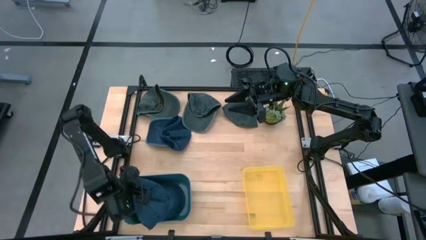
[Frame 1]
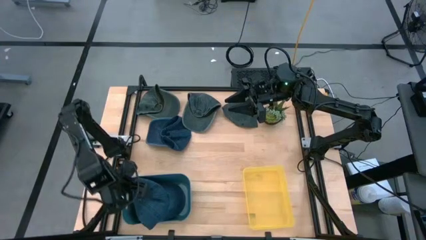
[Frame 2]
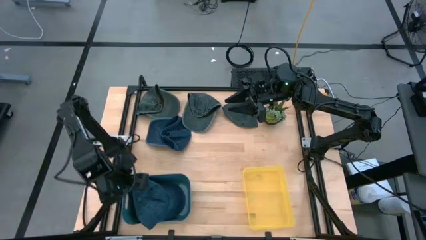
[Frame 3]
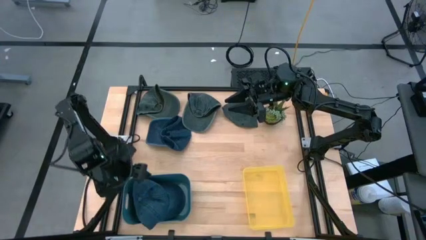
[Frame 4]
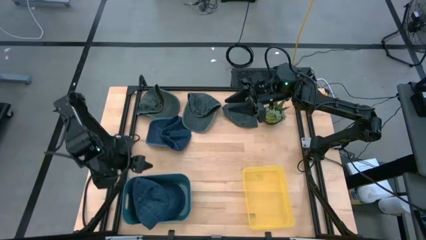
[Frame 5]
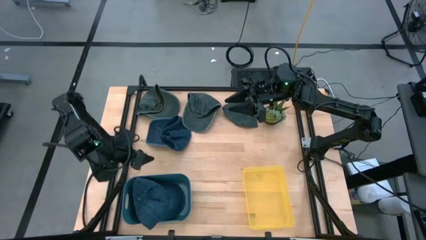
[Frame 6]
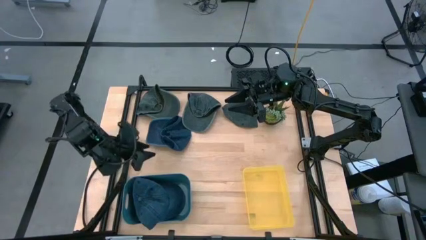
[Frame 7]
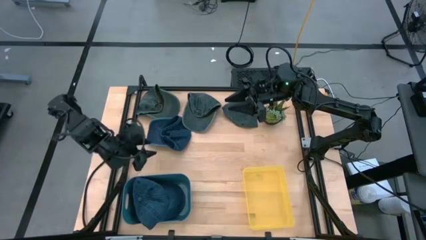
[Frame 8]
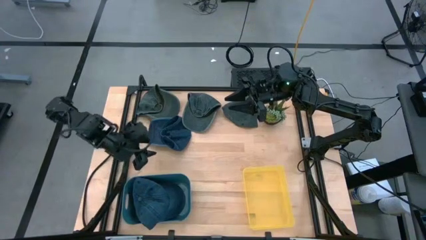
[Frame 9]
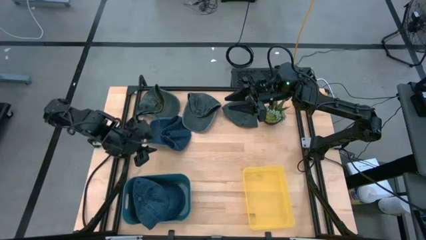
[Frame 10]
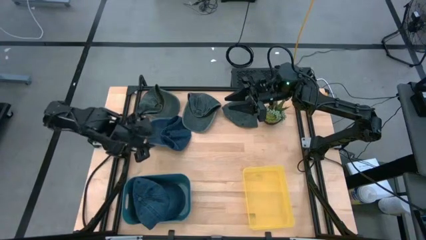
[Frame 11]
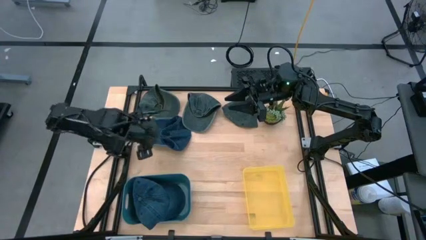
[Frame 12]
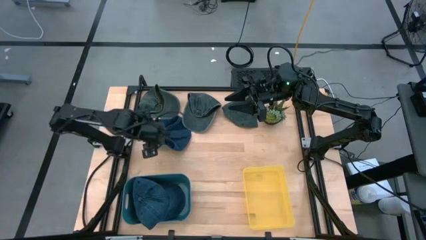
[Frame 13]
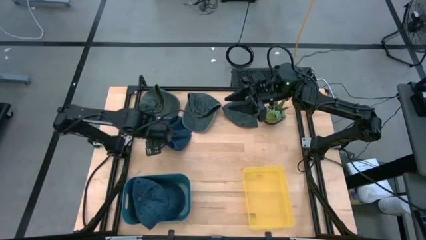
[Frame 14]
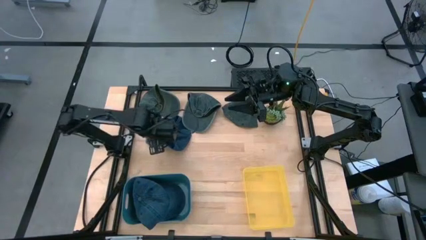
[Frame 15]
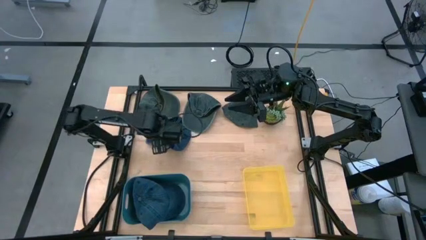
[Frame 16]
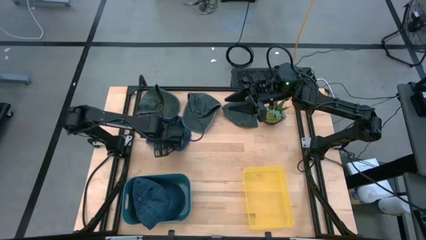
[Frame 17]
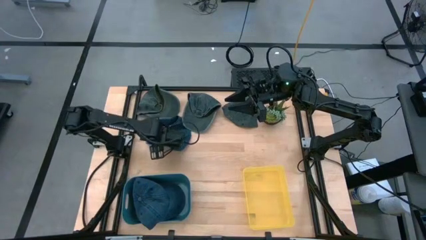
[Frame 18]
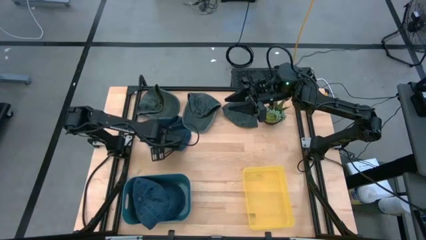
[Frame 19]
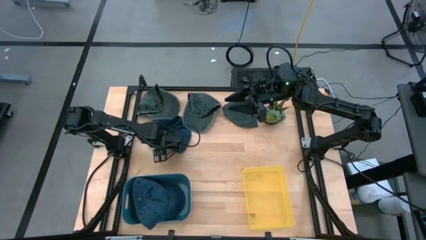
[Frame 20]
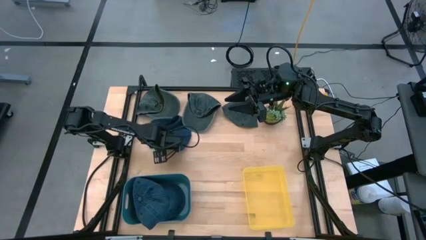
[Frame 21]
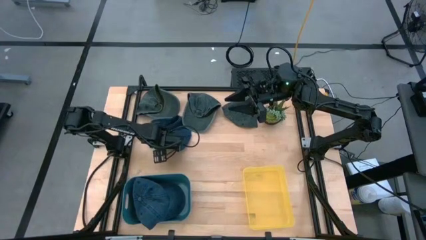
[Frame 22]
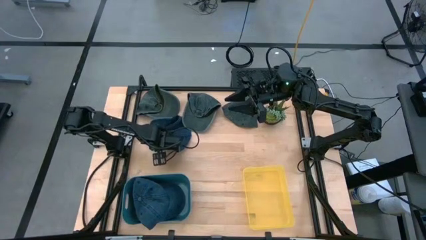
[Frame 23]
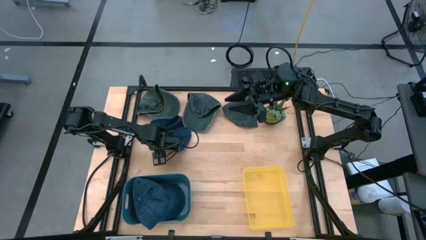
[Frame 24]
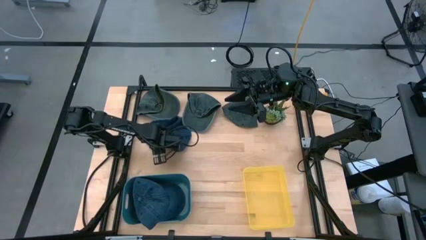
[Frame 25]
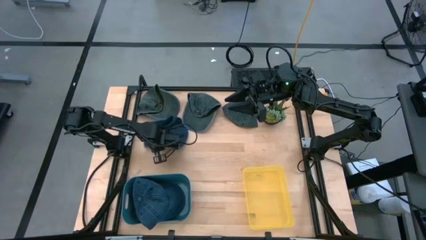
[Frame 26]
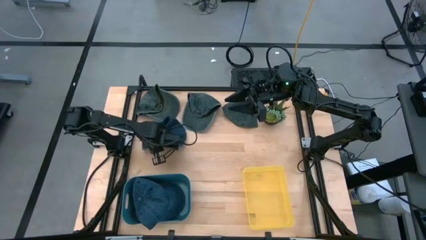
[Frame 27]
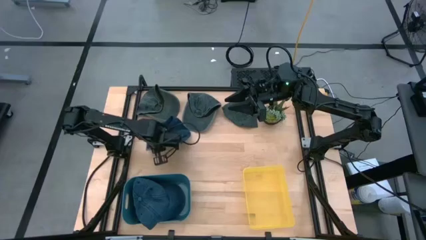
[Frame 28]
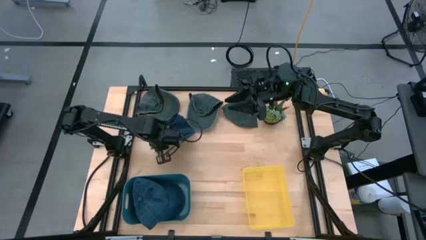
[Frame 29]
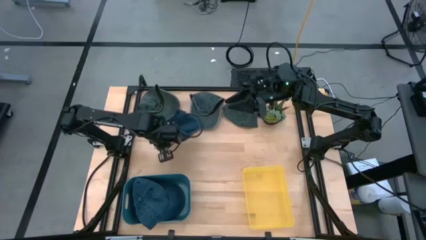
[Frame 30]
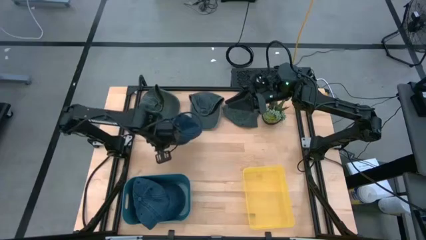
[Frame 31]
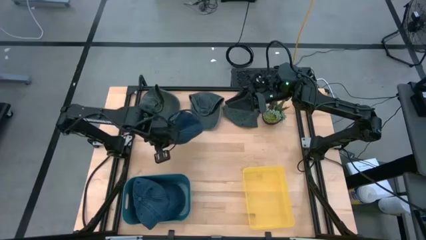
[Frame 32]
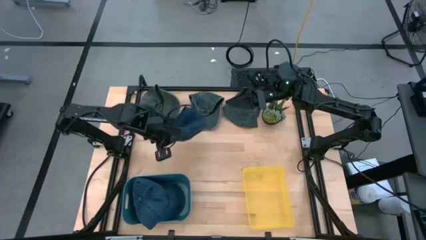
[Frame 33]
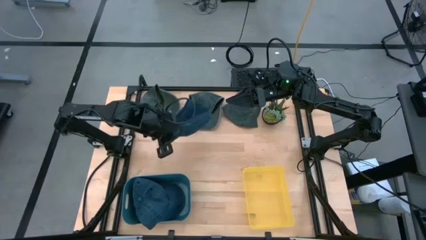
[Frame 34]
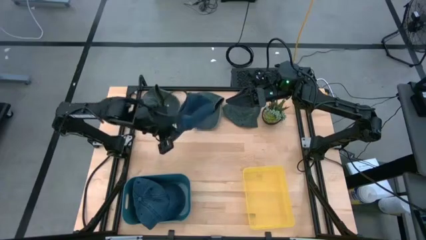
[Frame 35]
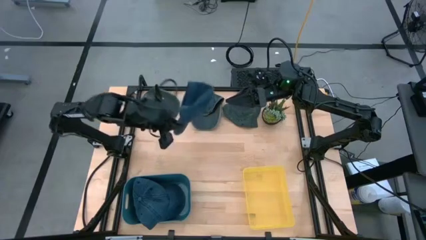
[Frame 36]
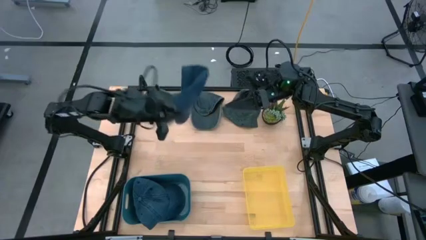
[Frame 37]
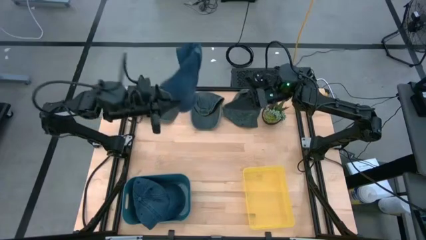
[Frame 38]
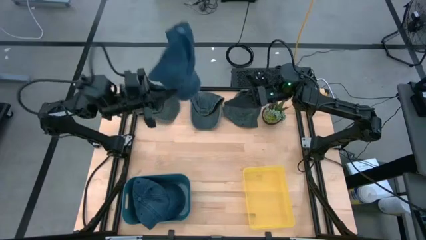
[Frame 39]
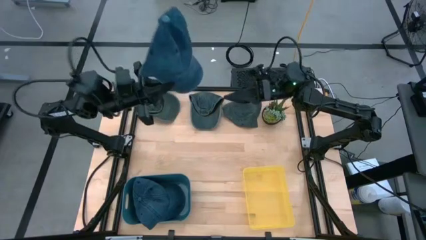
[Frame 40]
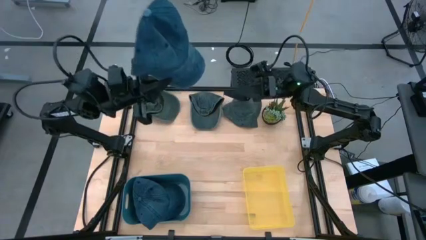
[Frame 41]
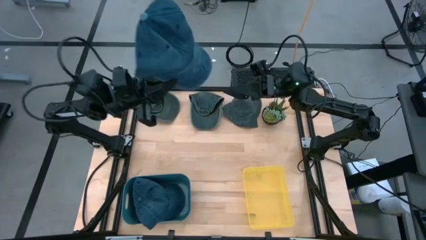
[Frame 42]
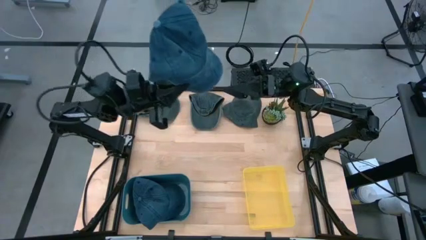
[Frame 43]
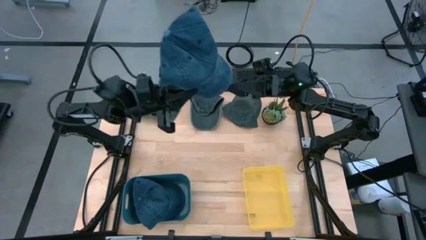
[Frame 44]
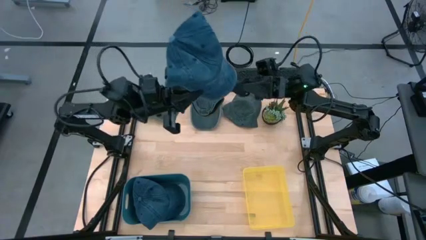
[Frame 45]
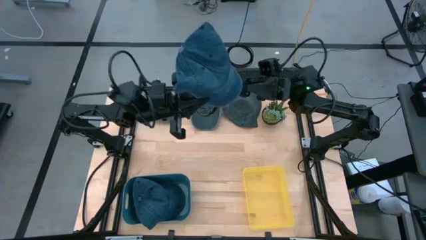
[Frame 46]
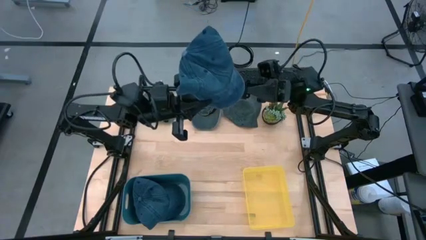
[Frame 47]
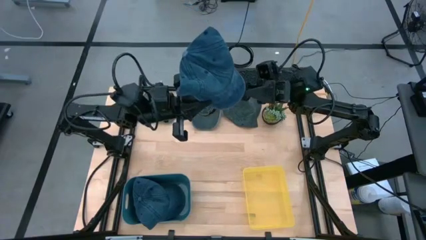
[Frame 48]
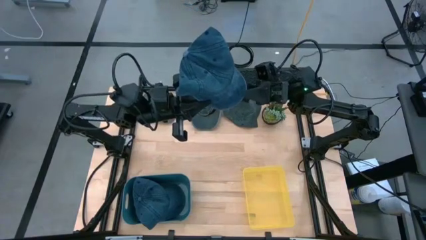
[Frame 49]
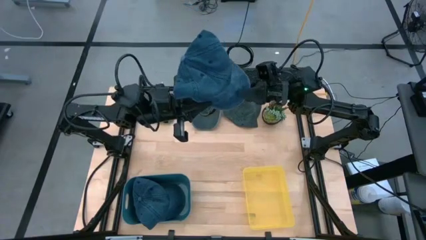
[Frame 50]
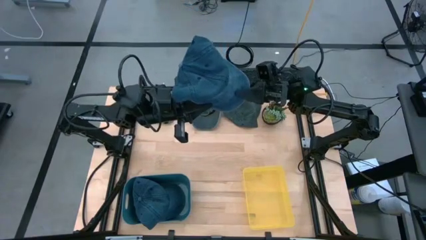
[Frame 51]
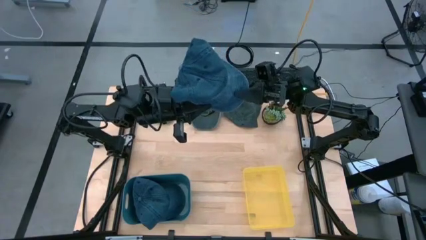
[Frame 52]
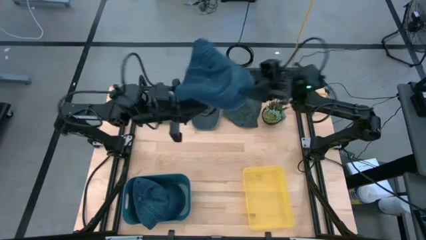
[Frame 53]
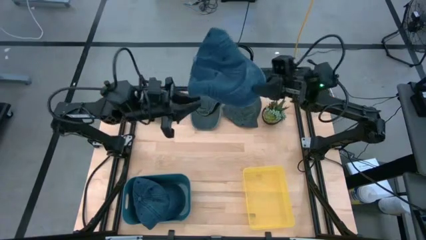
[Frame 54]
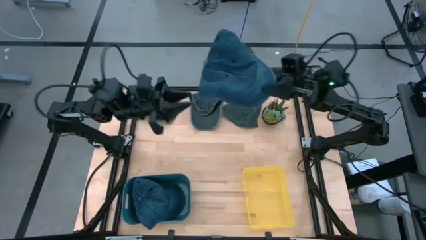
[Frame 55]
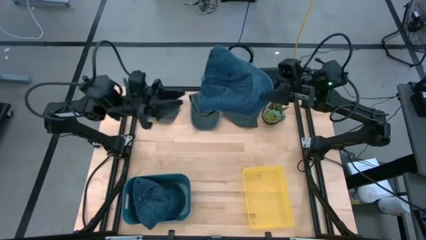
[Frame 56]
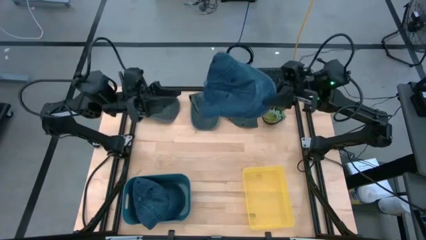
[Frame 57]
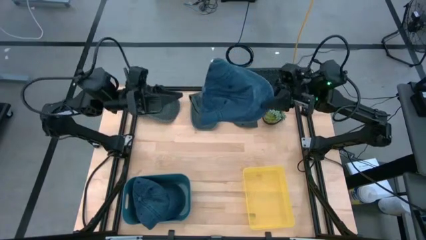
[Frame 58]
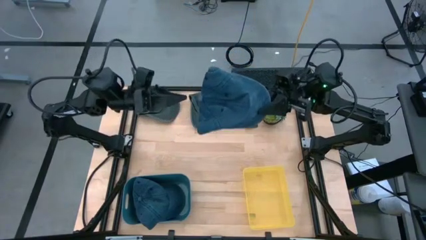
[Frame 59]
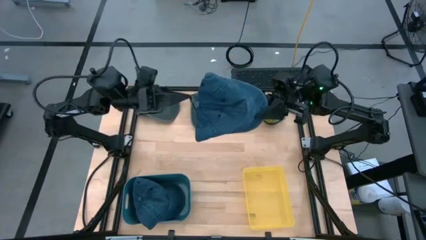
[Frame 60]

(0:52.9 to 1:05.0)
Task: Pick & Place hat
Put the dark blue cap into the blue bin

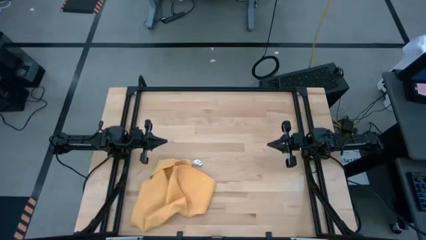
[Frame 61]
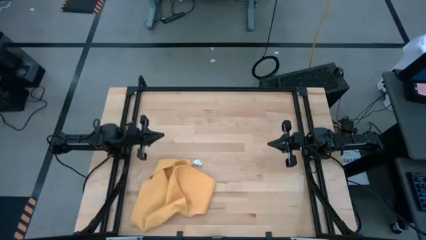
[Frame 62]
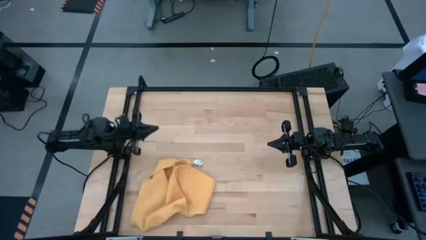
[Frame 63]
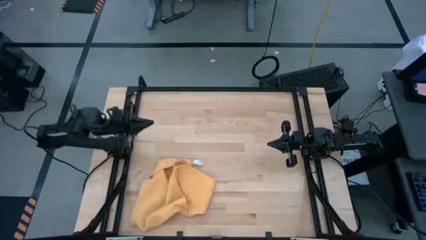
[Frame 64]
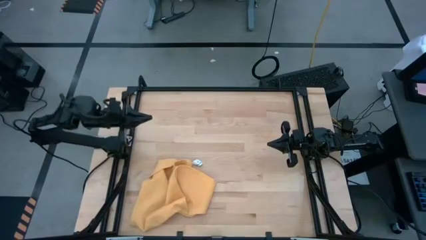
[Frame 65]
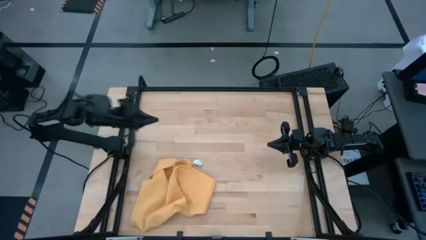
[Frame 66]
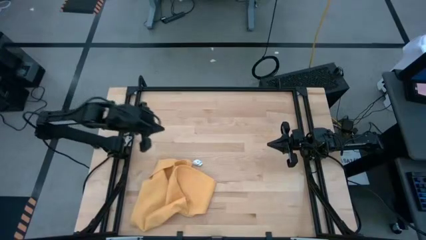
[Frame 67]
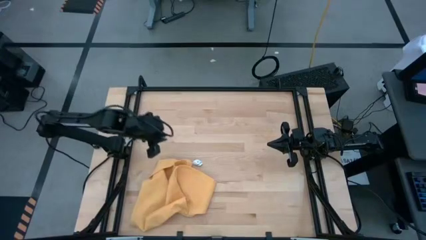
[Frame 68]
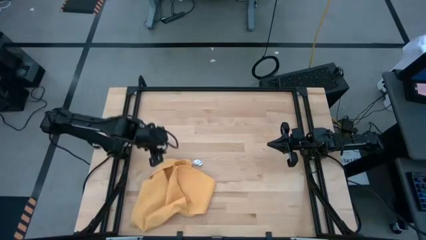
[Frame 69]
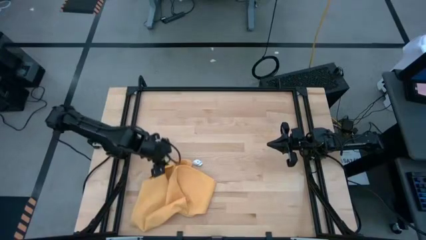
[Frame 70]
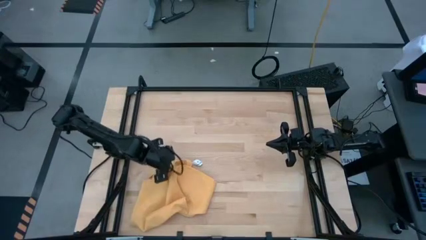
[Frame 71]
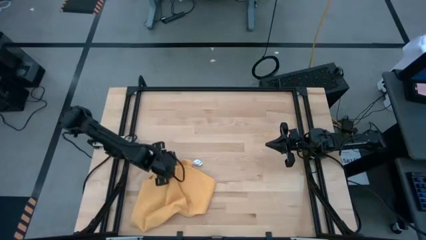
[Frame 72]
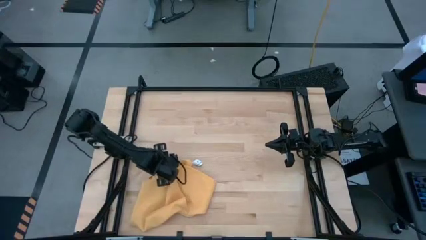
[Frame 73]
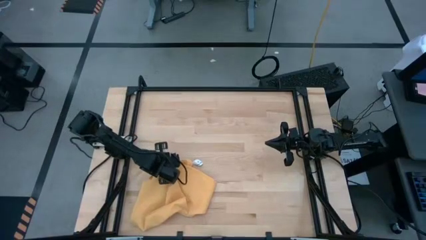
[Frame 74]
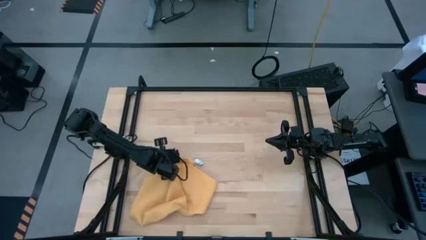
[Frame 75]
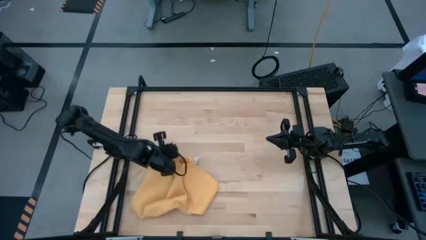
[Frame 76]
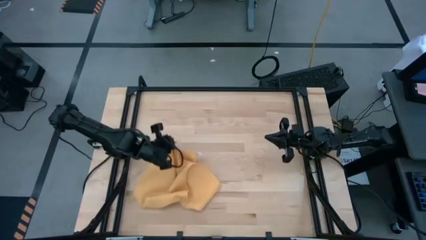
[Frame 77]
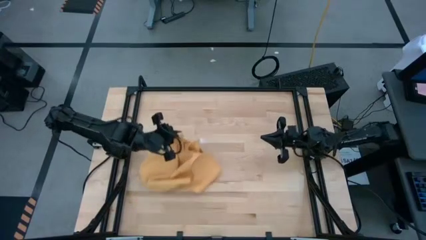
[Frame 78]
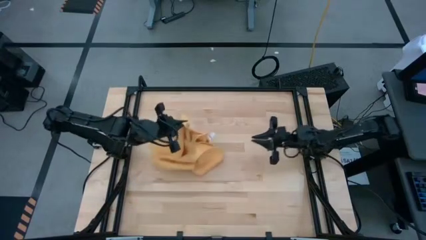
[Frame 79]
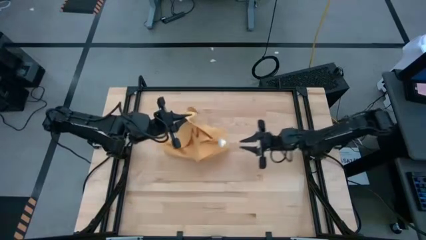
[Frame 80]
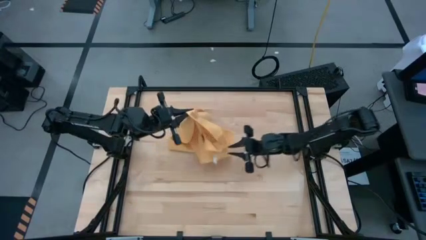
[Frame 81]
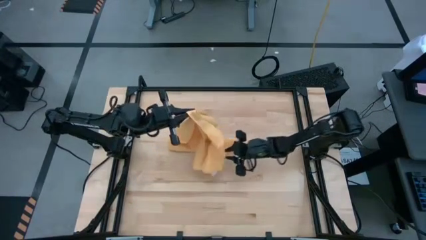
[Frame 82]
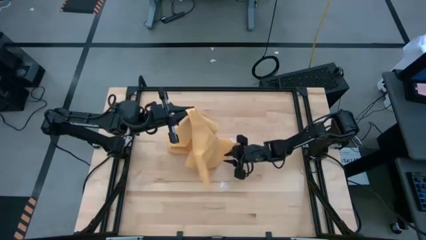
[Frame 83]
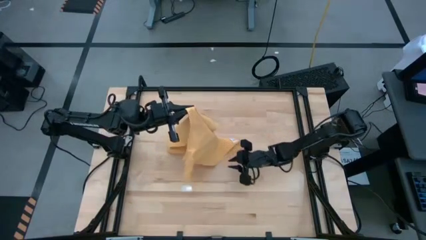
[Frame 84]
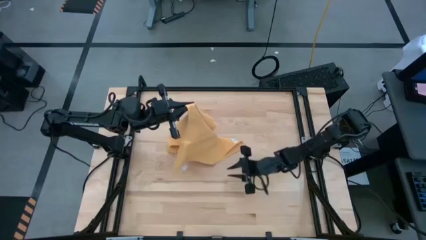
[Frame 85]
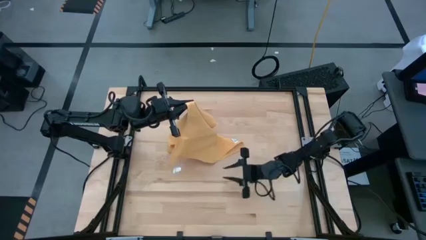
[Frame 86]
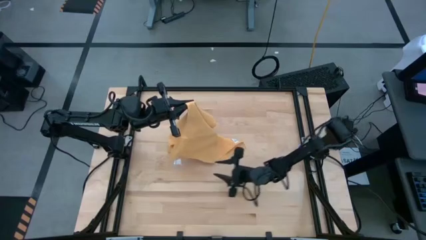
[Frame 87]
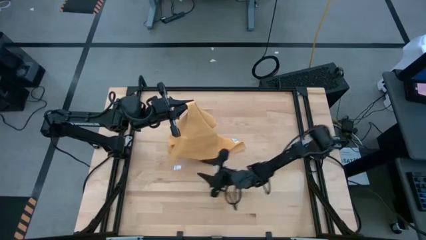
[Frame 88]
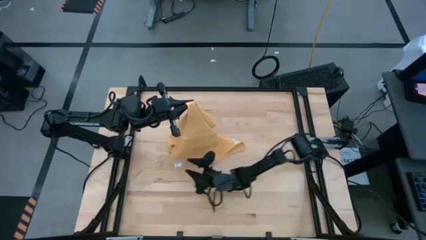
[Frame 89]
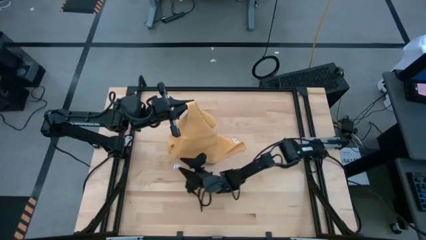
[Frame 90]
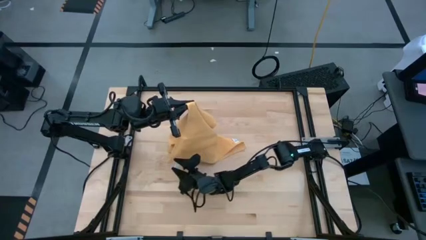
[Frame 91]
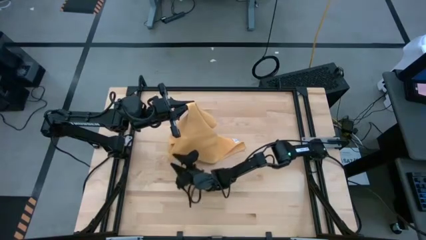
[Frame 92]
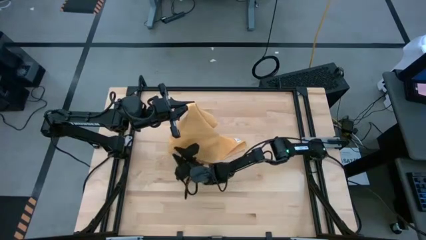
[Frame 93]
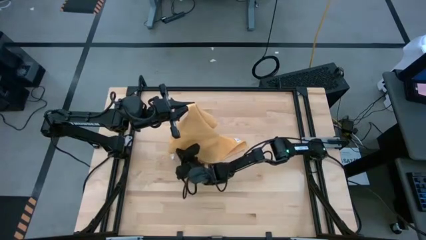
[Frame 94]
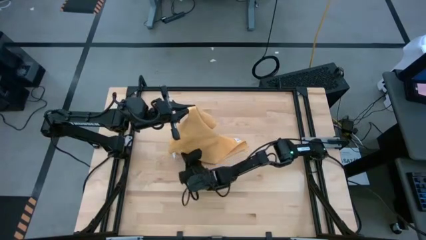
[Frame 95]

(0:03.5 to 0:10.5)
Task: Roll towel
Fold the yellow towel
